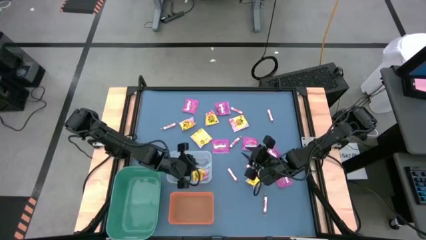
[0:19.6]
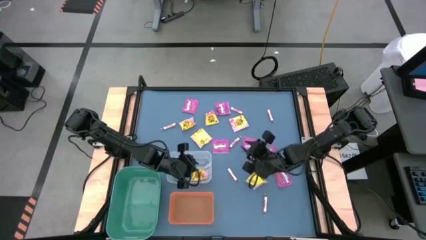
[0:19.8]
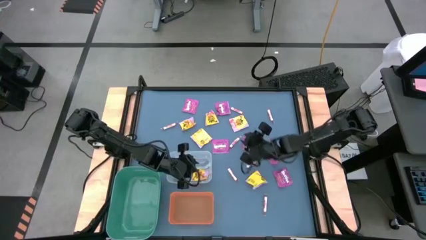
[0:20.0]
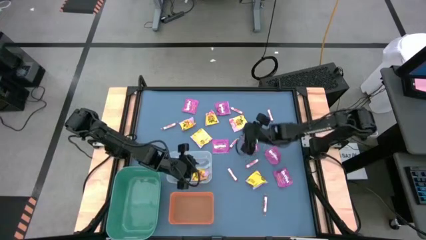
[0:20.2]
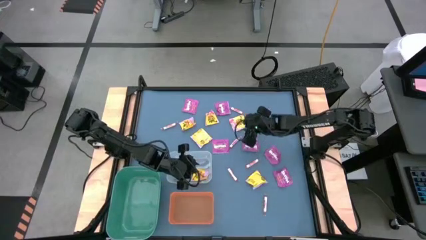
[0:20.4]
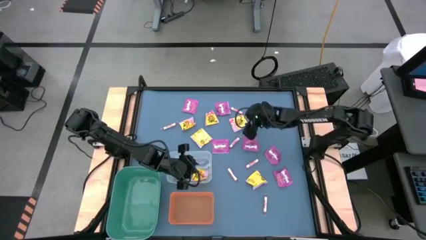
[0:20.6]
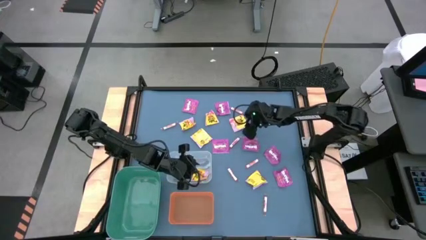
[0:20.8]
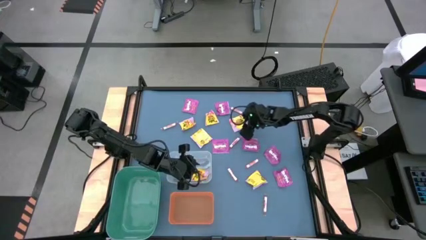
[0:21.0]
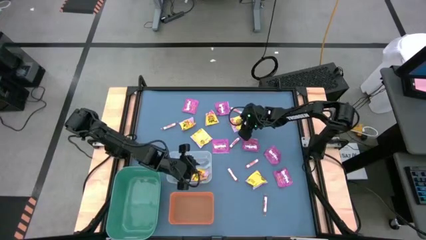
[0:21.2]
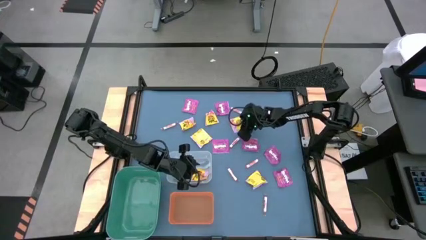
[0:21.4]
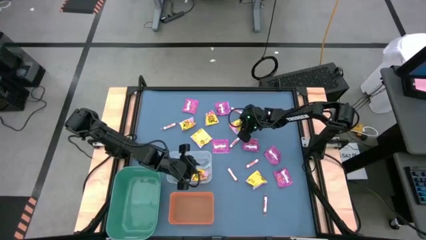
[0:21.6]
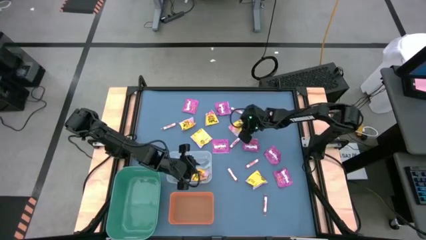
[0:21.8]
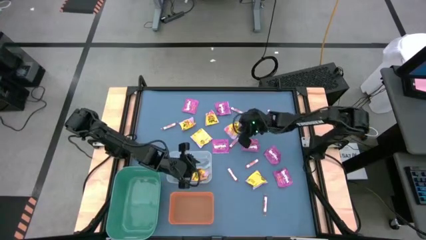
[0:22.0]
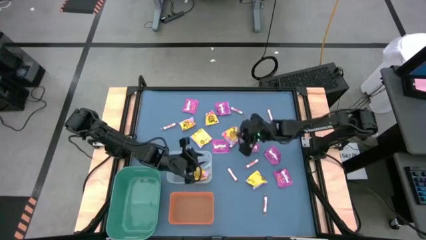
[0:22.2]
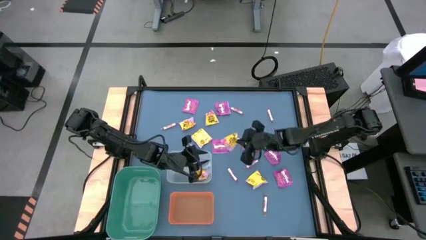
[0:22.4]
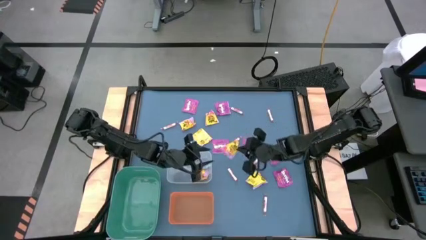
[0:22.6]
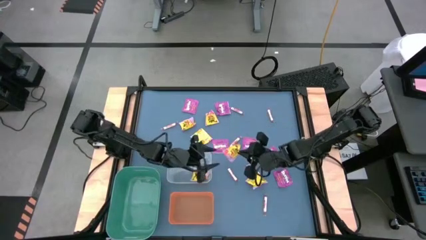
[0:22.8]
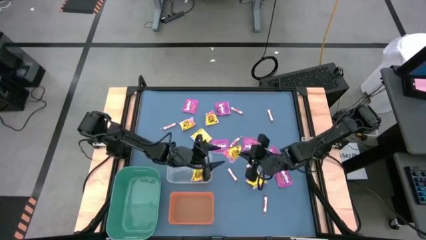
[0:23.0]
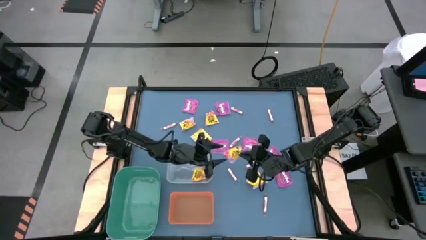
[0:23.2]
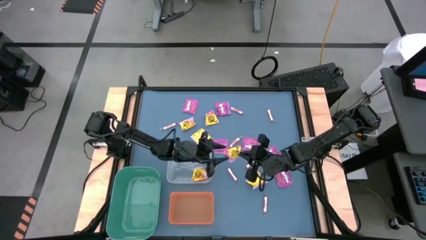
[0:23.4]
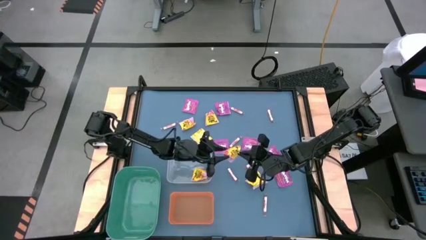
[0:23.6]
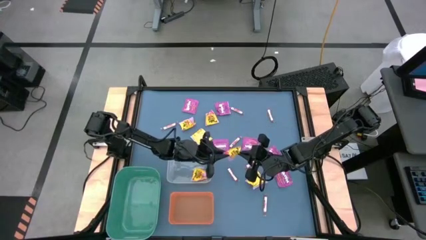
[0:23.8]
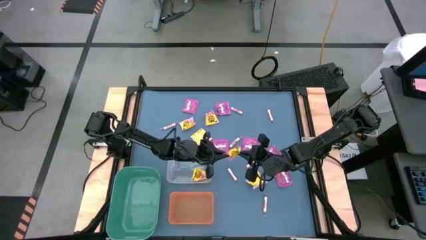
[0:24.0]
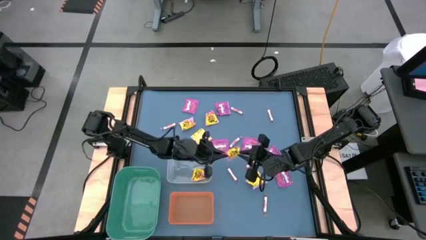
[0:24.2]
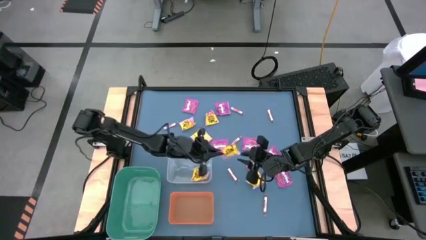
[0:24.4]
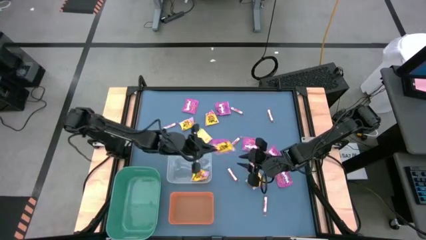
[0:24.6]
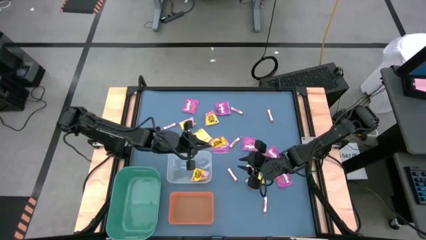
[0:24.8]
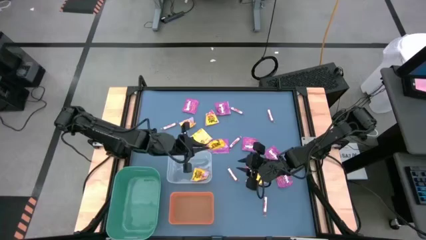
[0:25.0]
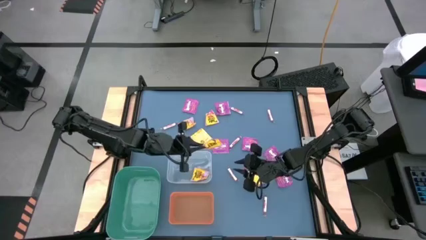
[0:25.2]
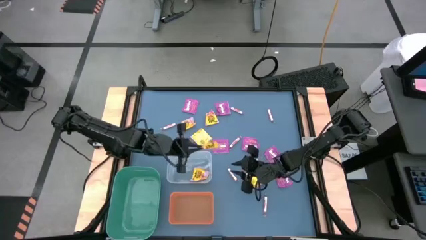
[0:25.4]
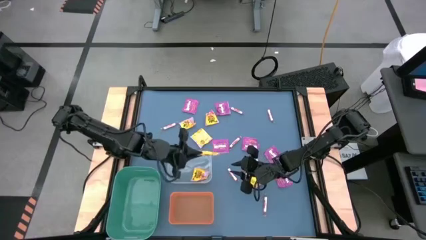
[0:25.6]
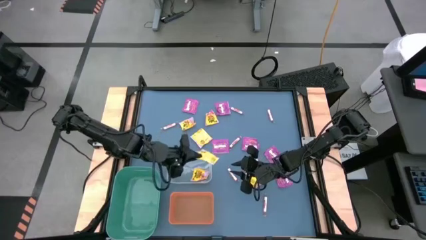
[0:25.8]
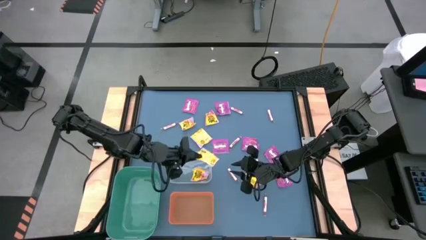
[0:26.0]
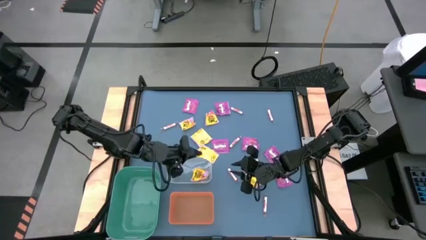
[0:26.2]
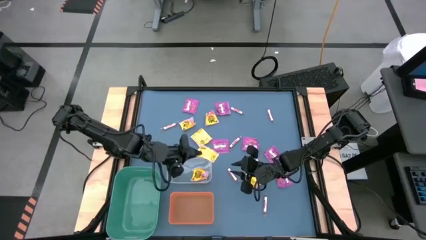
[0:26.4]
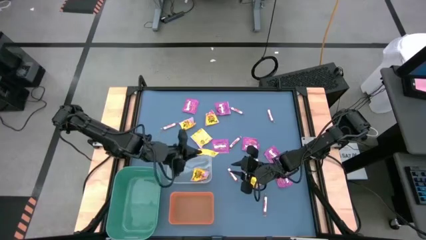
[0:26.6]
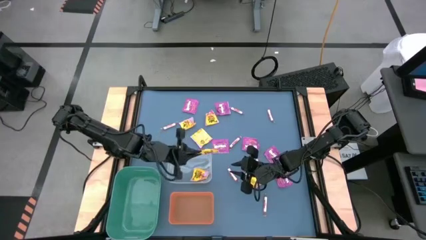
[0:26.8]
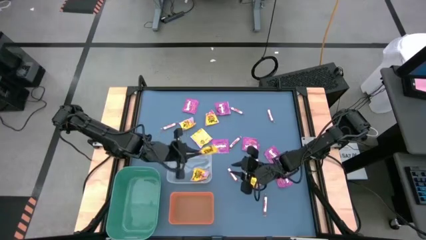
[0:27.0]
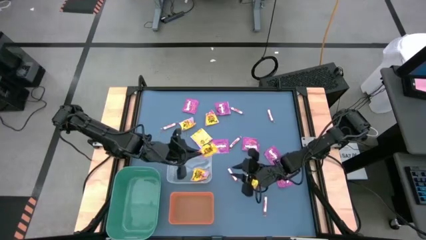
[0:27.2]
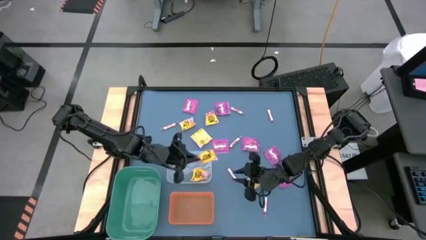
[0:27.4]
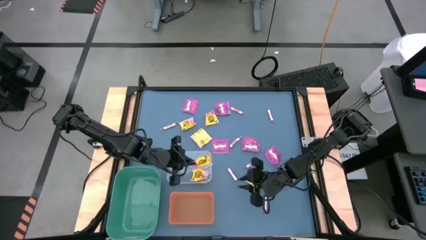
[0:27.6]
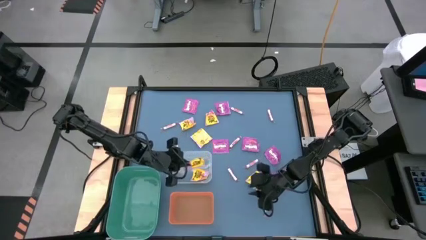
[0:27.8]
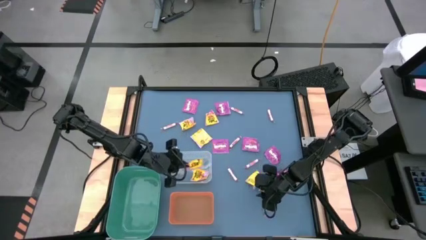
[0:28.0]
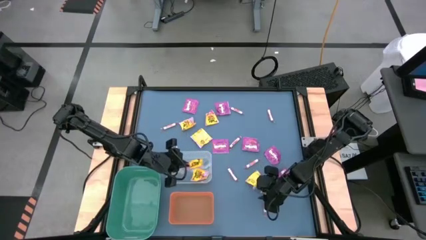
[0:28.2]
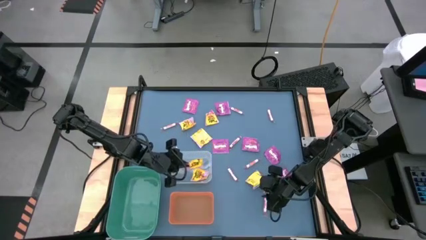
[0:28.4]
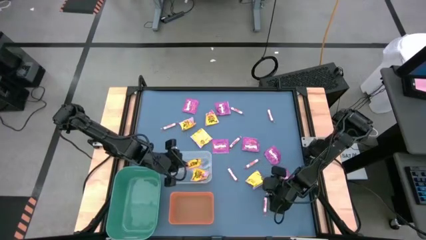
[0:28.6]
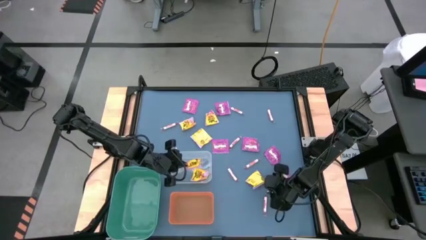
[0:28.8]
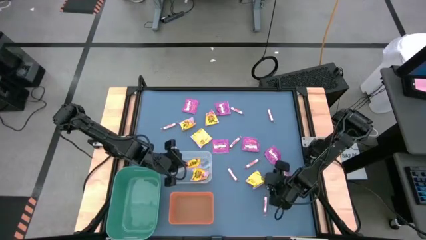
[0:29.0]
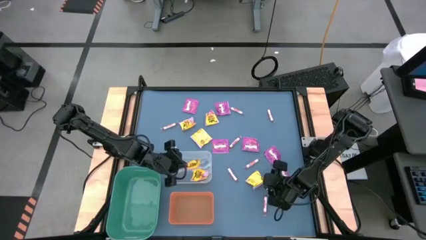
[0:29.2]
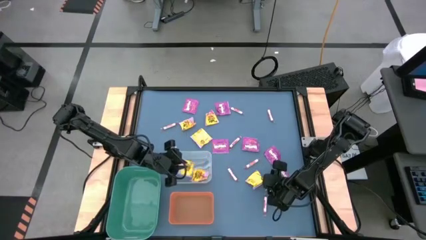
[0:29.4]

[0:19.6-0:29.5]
Task: Sort candy
Put the yellow candy into the transparent bin

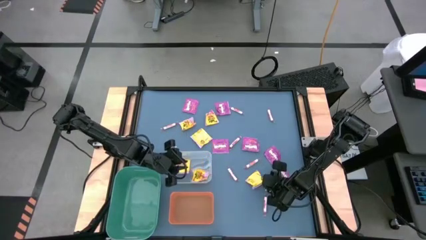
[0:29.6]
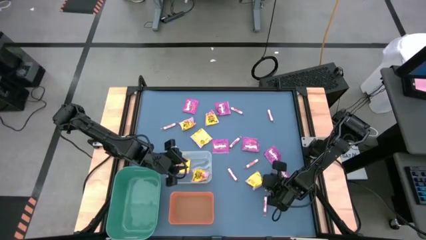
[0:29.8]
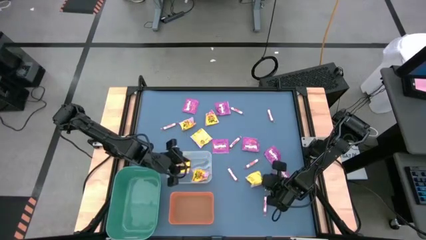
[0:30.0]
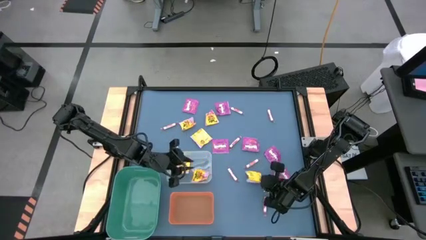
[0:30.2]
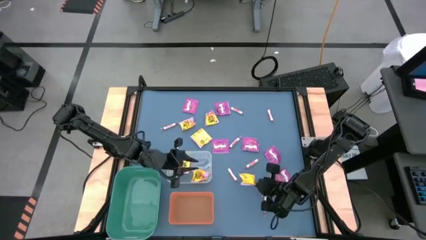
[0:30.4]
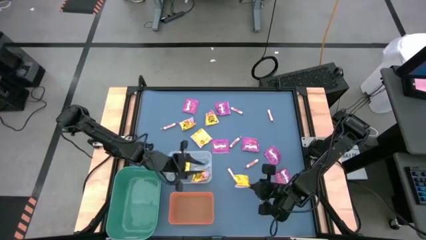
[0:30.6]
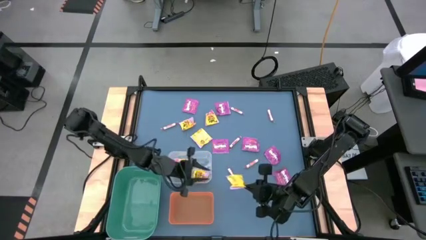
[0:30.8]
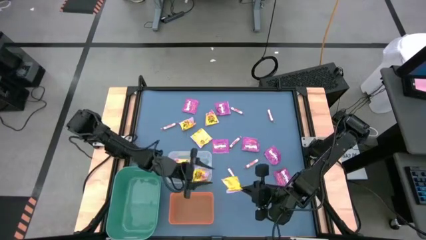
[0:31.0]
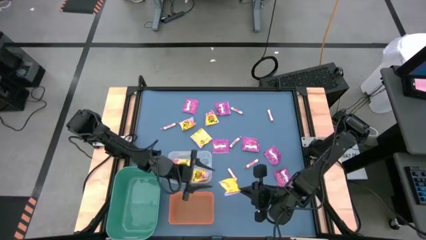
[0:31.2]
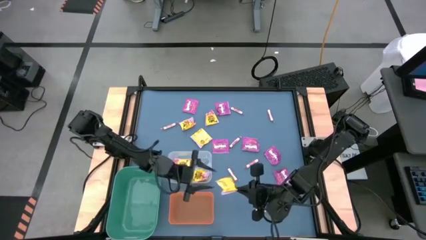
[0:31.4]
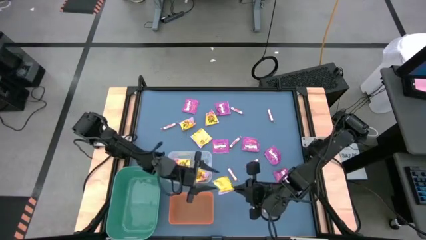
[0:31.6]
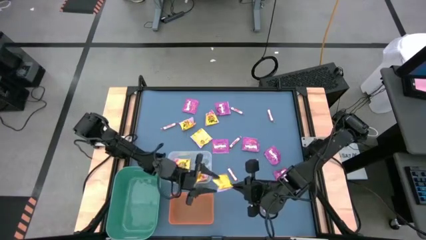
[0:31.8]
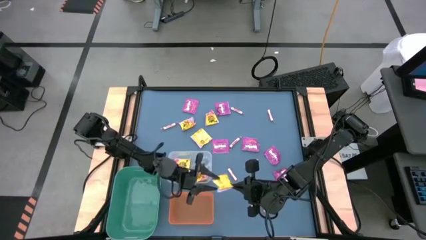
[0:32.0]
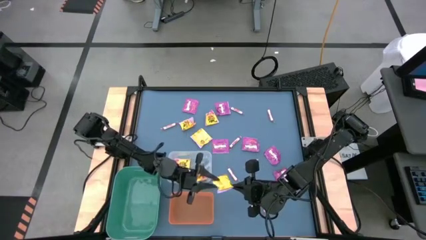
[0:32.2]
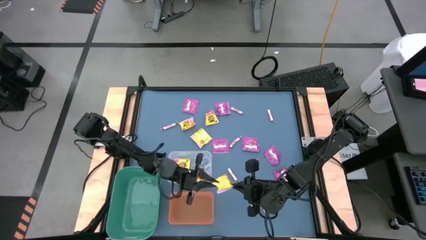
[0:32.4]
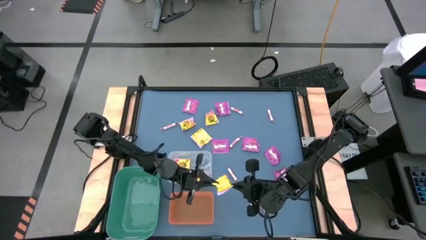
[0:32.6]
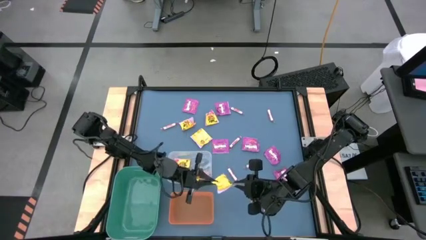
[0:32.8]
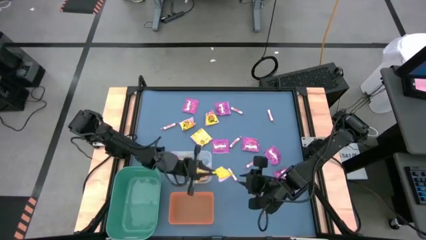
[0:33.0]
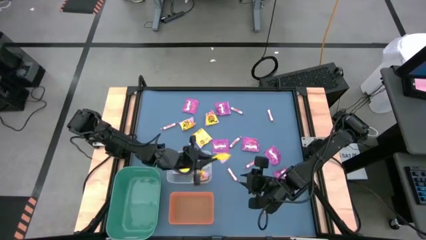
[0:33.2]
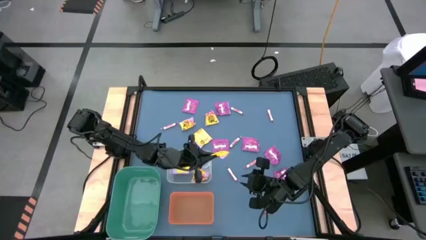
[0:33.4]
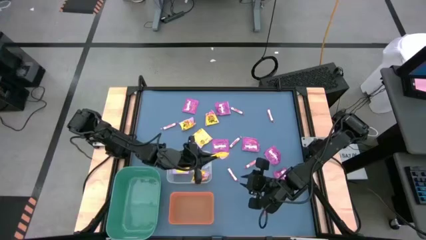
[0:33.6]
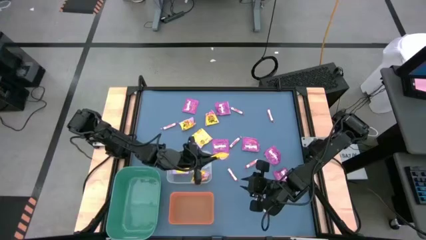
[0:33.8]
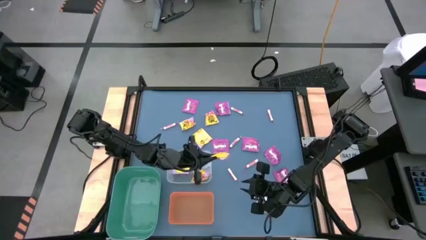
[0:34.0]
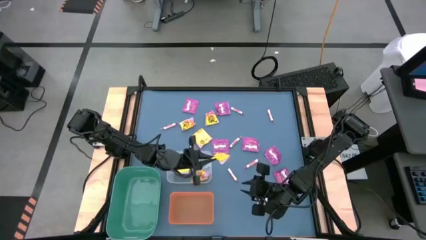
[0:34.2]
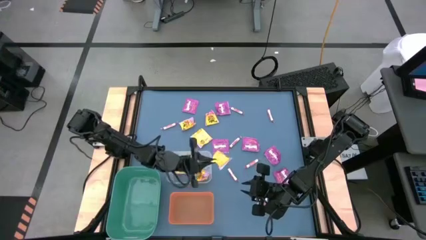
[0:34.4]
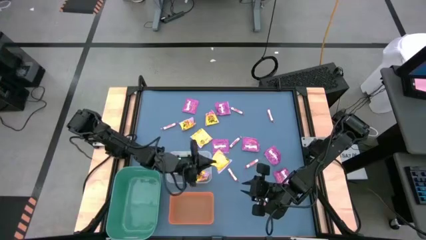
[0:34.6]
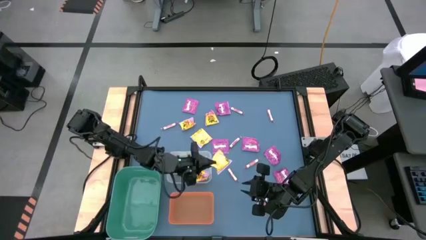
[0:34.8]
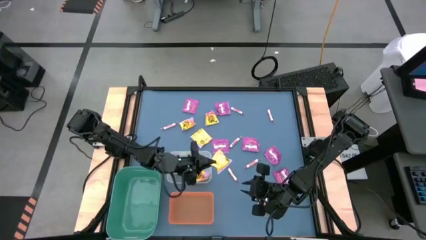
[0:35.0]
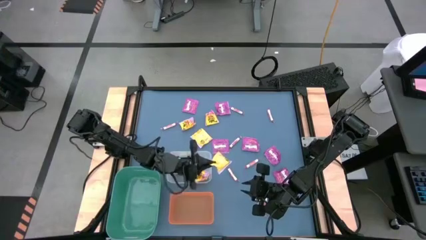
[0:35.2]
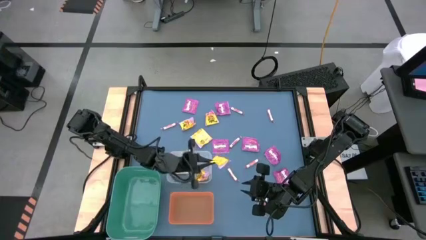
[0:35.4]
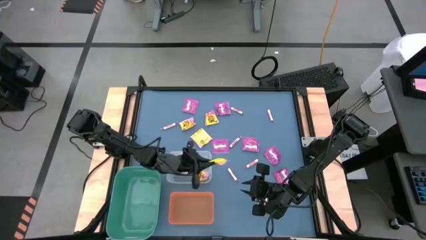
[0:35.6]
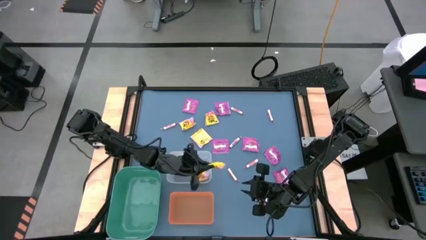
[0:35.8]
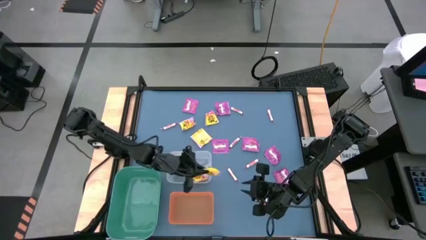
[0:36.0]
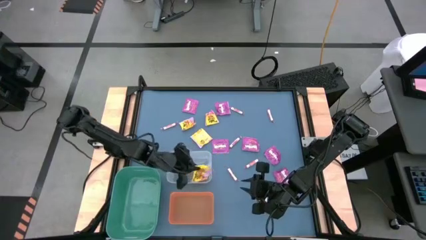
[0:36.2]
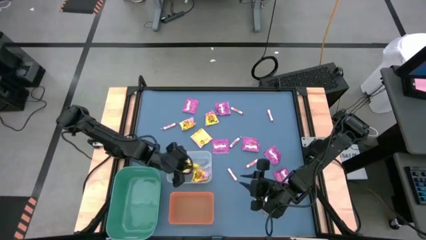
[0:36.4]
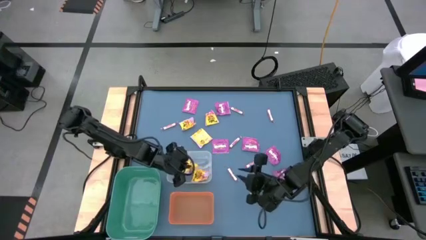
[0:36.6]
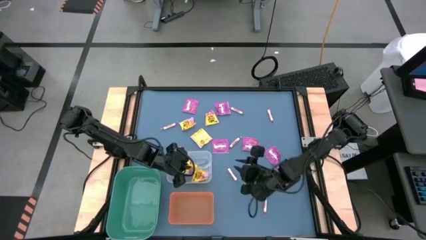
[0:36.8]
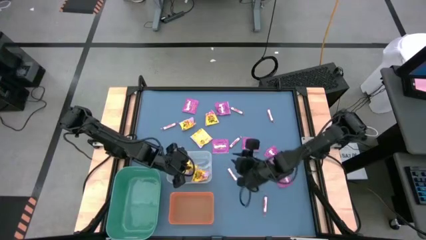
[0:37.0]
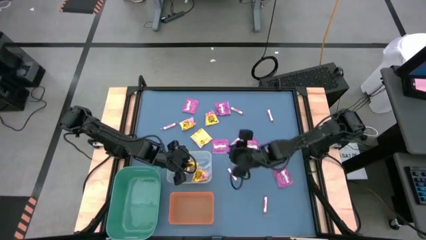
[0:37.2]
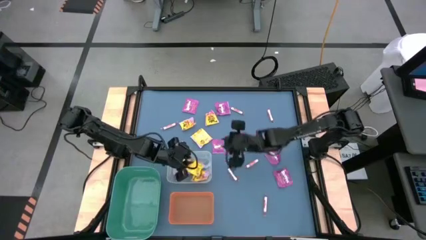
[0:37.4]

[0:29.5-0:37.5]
Put the yellow candy into the transparent bin
